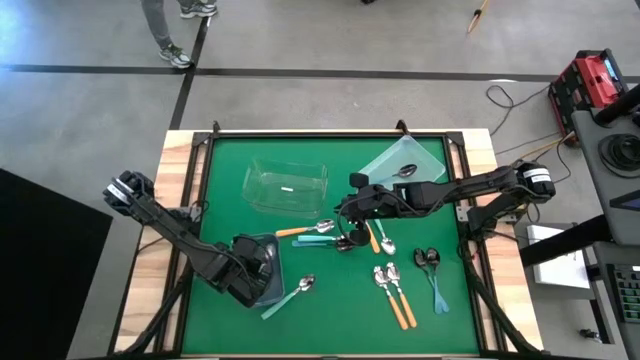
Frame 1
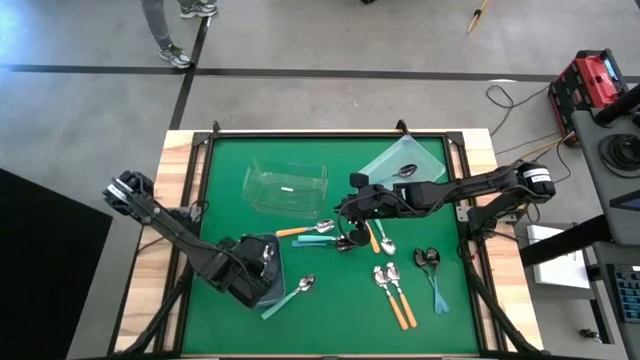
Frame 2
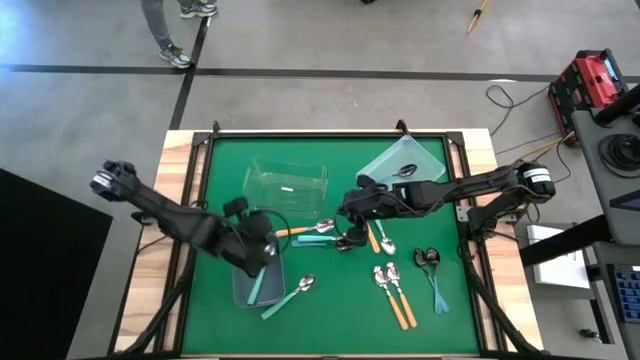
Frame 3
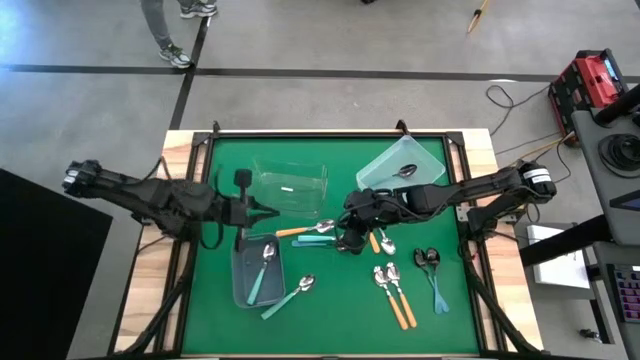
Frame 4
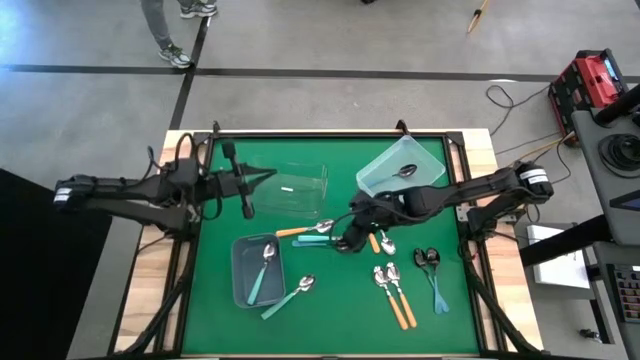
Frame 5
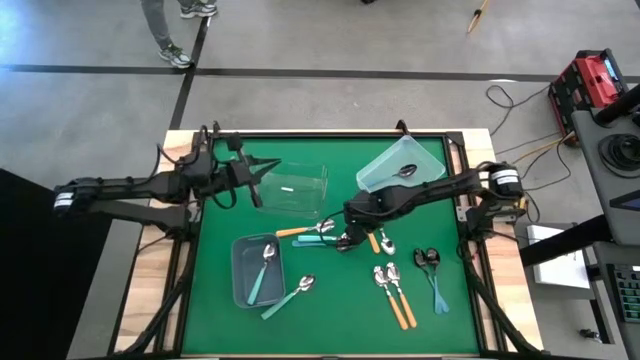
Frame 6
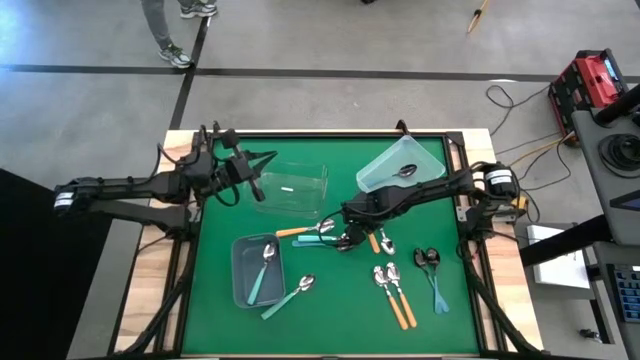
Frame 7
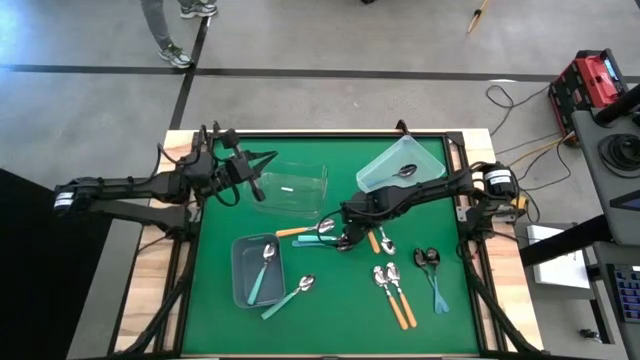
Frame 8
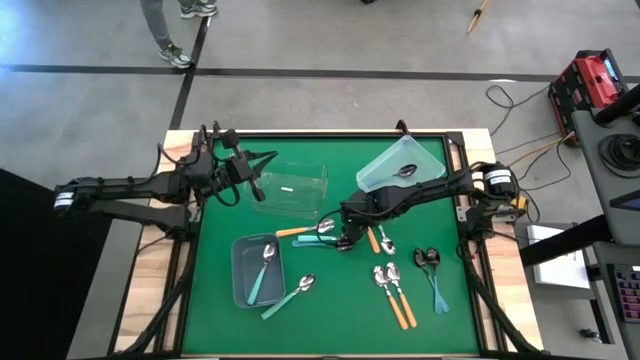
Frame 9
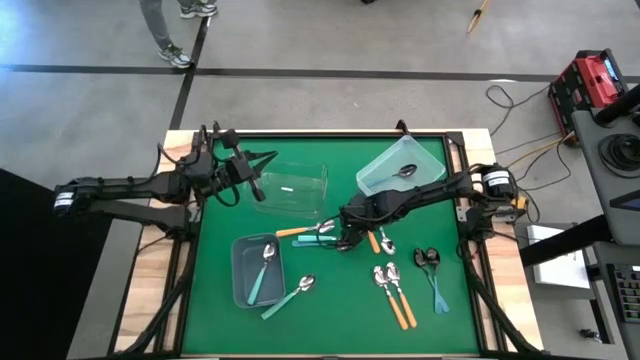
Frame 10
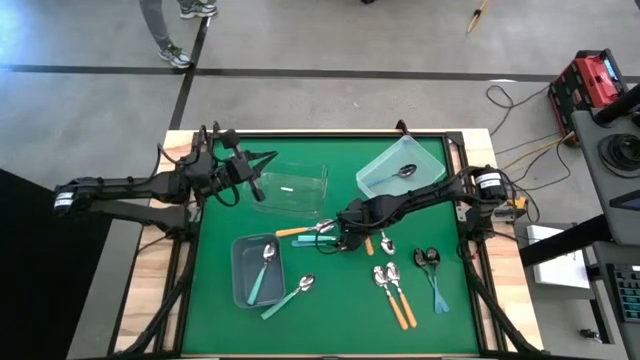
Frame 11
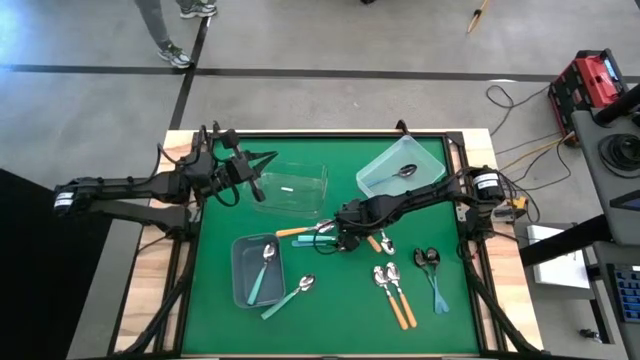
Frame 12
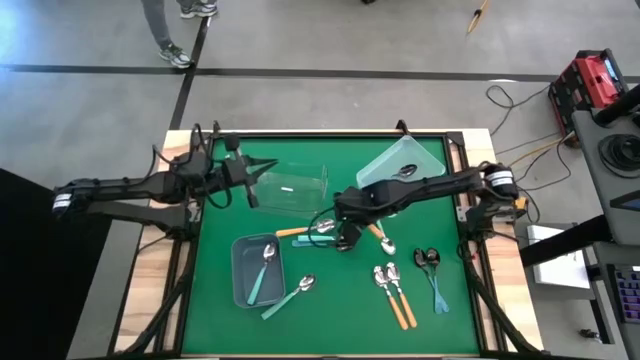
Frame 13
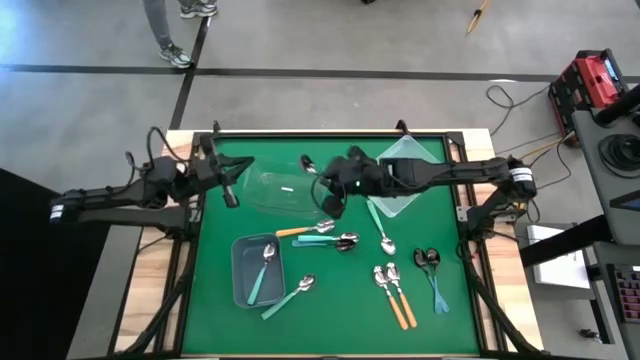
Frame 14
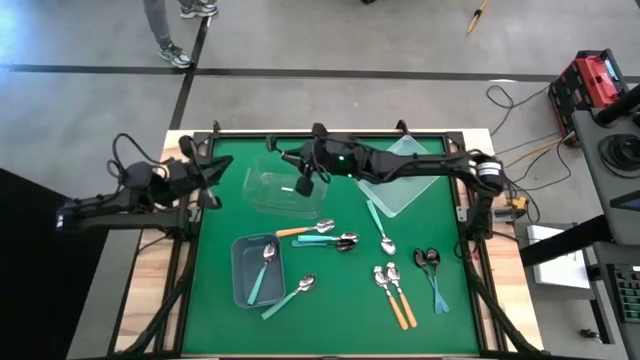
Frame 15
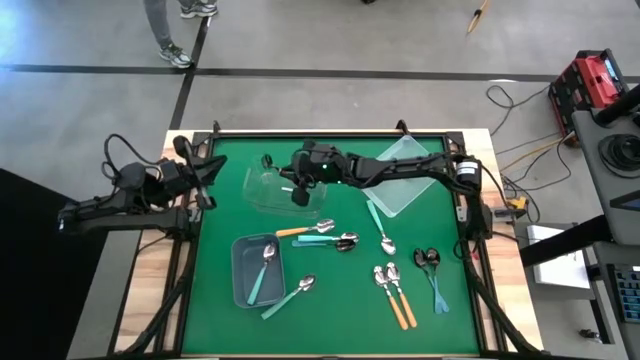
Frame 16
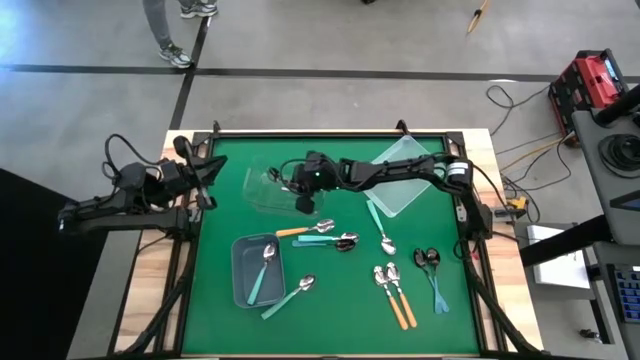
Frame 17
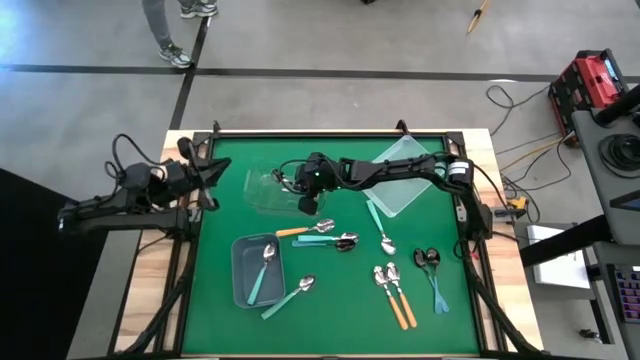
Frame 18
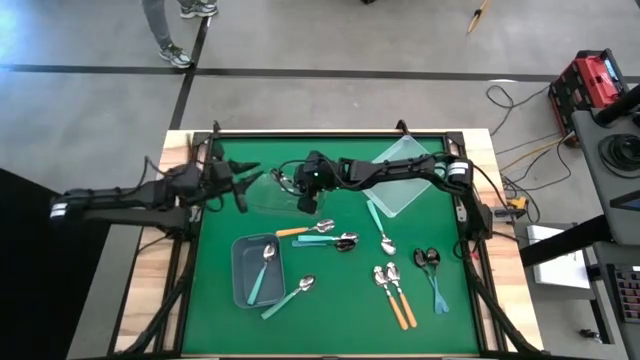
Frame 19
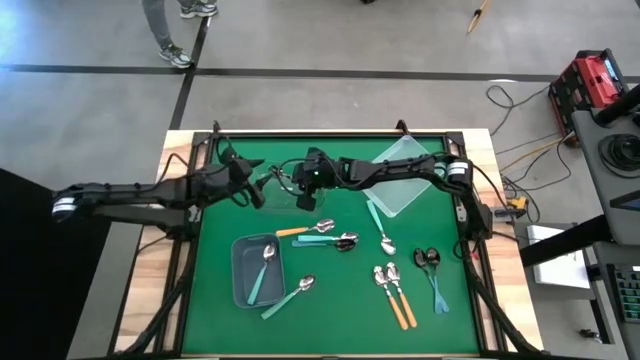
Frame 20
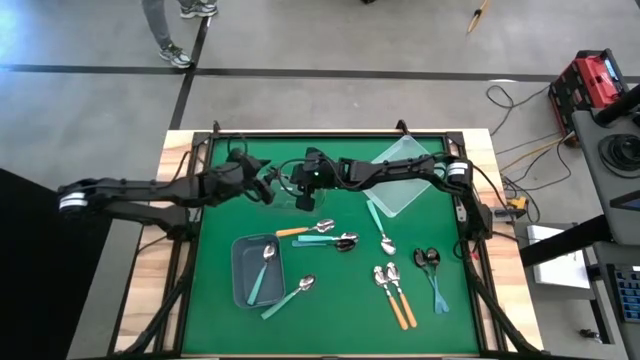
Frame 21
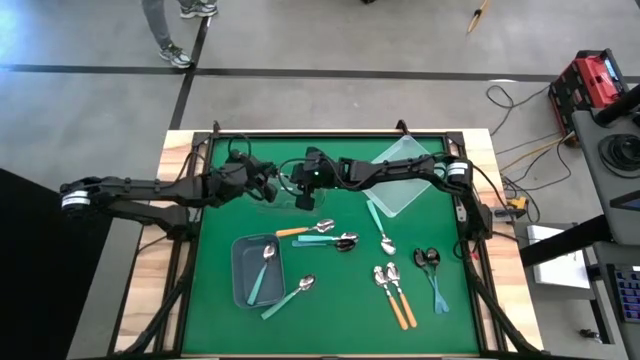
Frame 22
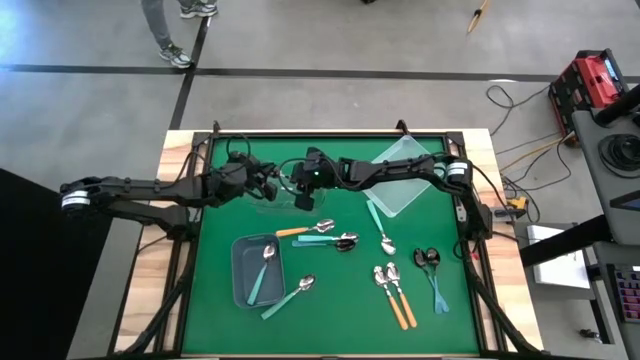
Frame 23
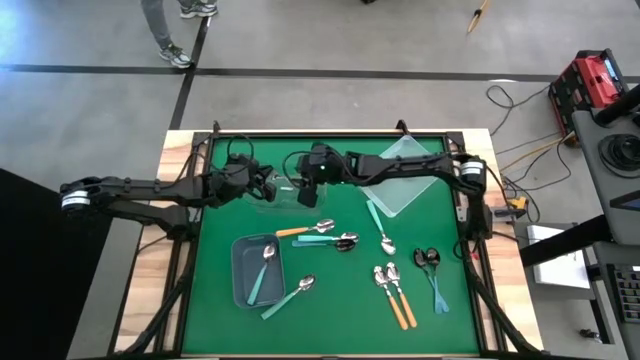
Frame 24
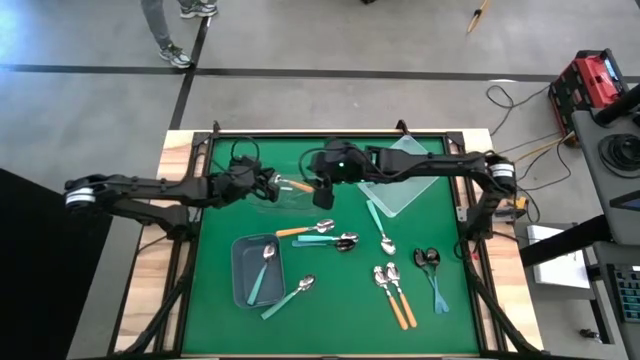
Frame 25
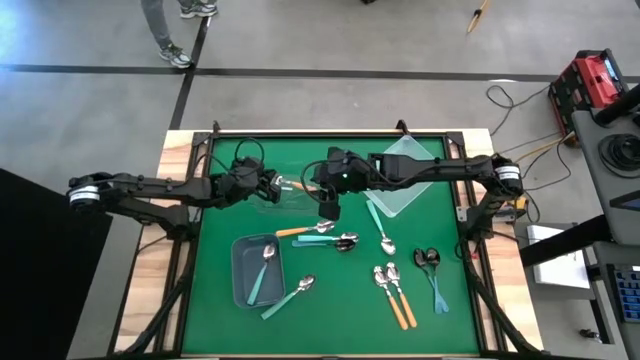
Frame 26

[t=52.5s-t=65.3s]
Task: Sort silverware by color (type)
Put the orange spoon into the transparent bin

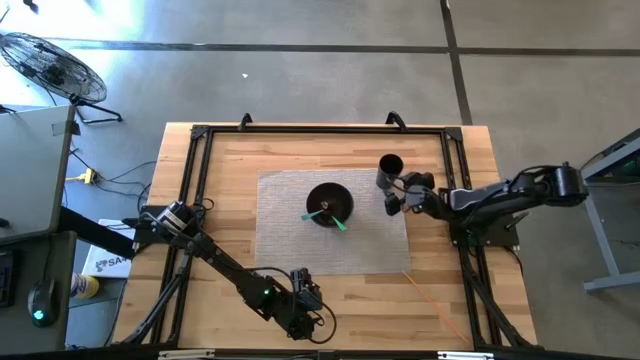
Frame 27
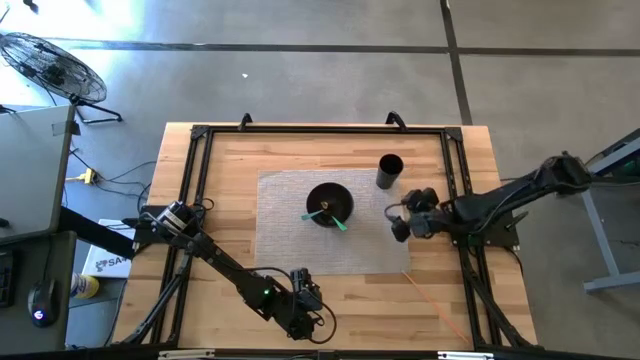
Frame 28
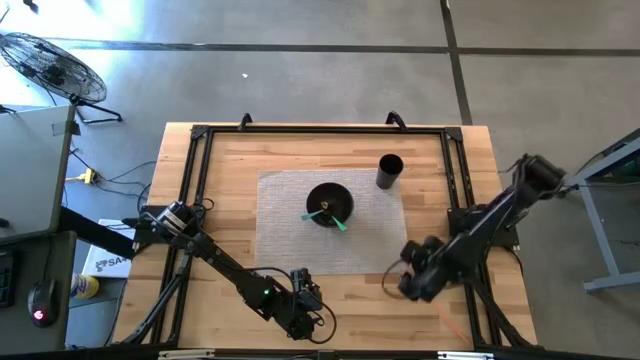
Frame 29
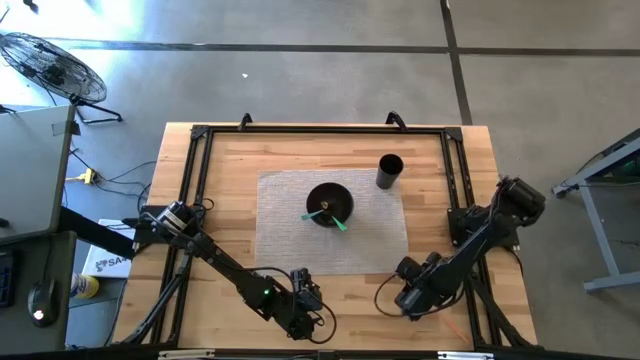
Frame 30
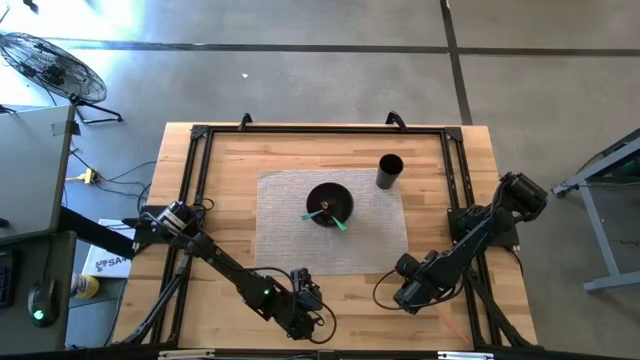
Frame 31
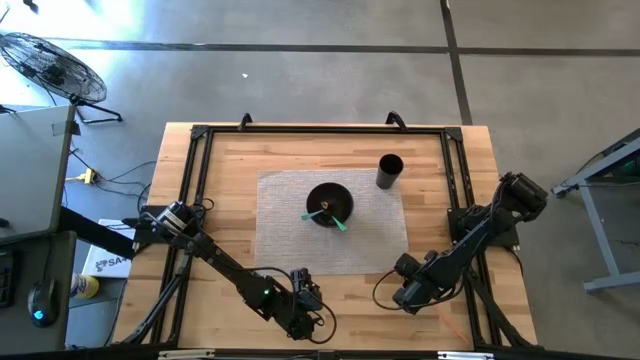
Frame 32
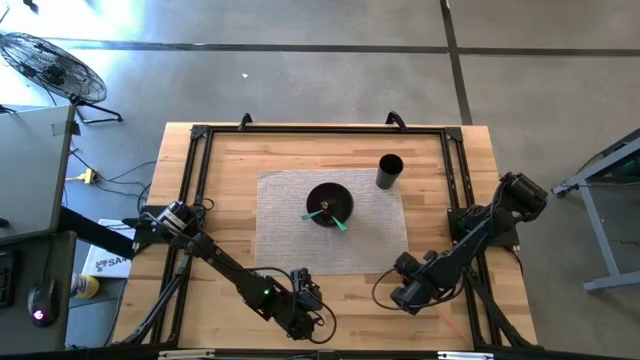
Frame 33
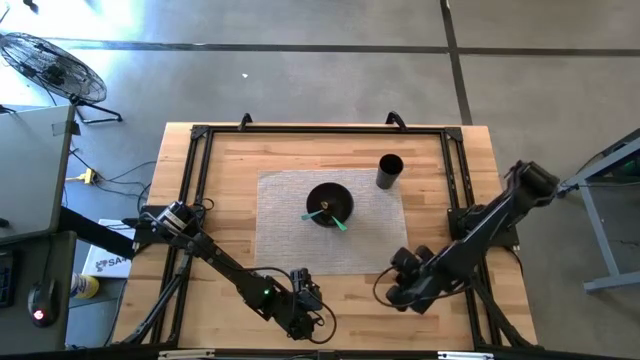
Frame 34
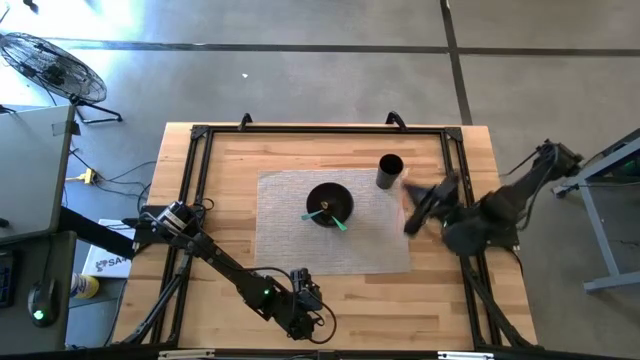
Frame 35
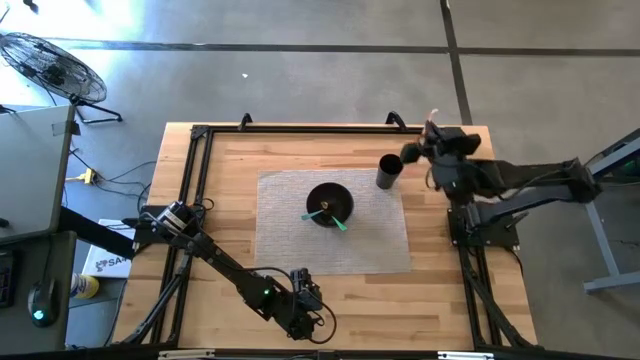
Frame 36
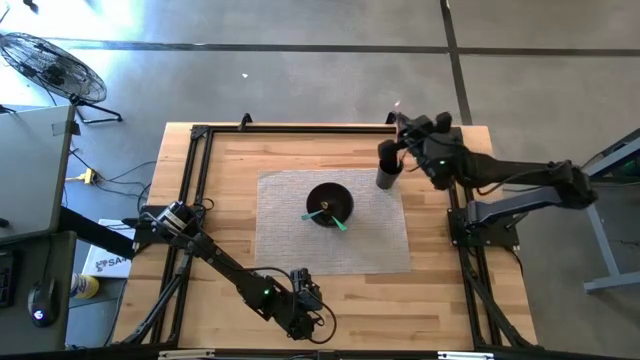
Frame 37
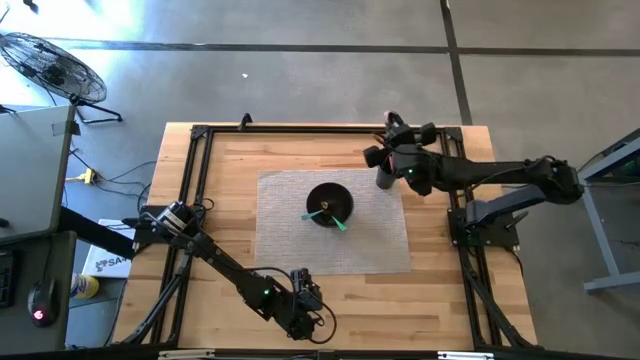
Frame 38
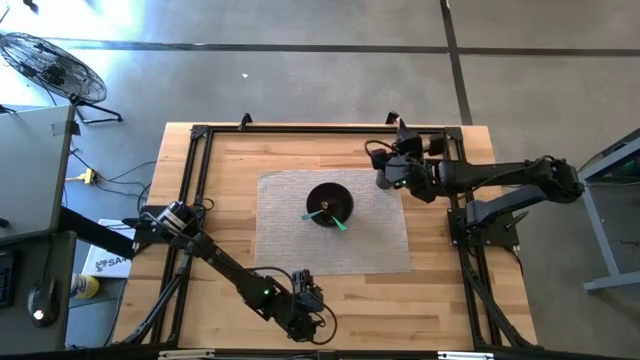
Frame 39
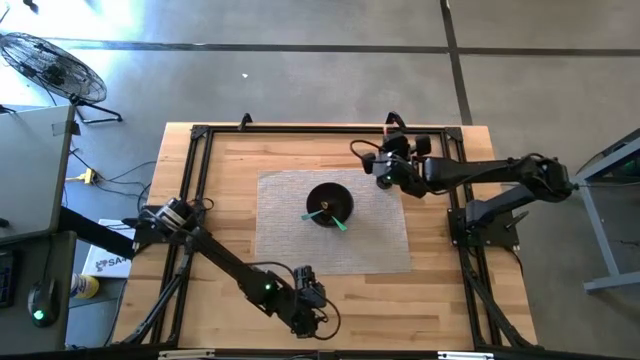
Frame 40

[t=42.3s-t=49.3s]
Task: Pick & Place Utensil
Put the orange straw into the black cup
